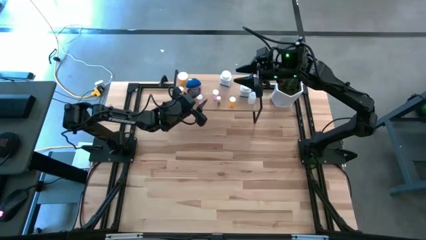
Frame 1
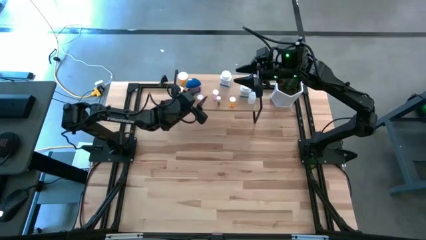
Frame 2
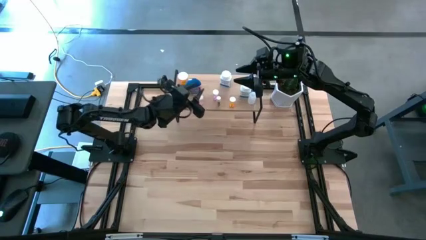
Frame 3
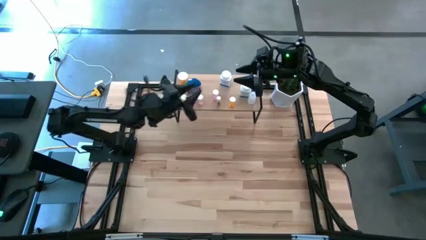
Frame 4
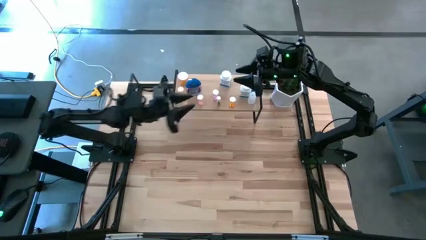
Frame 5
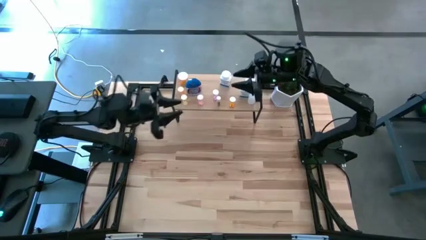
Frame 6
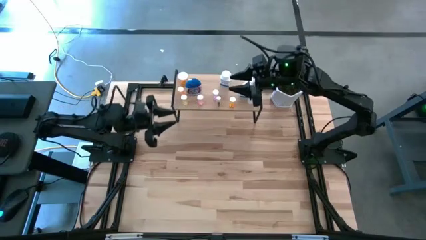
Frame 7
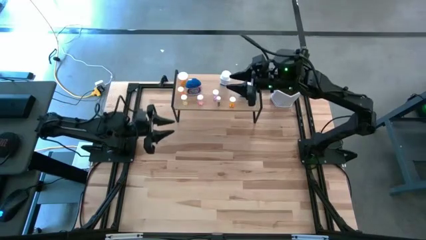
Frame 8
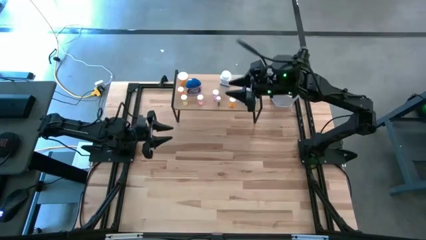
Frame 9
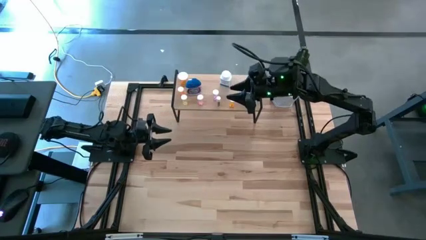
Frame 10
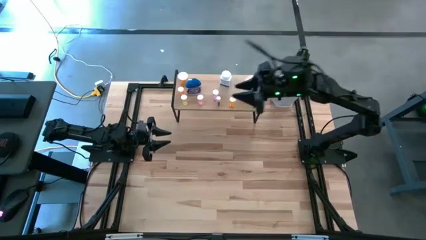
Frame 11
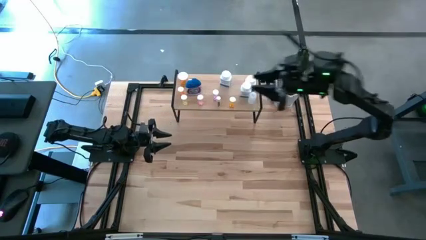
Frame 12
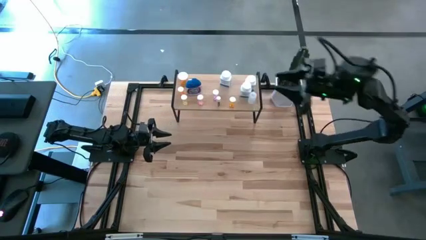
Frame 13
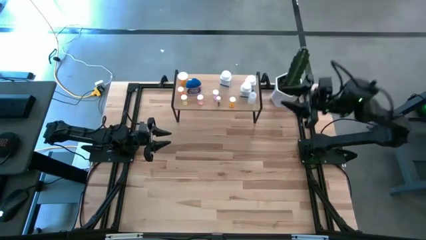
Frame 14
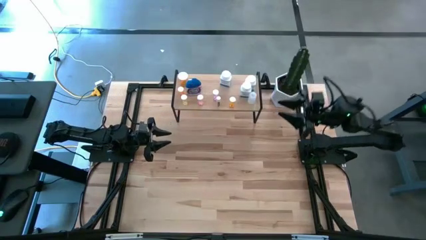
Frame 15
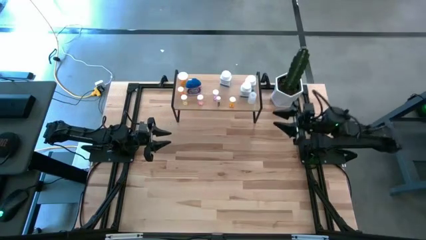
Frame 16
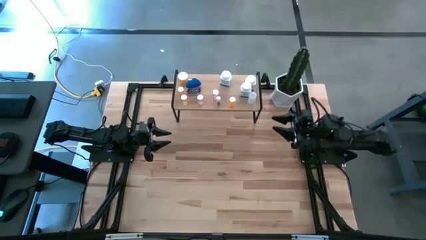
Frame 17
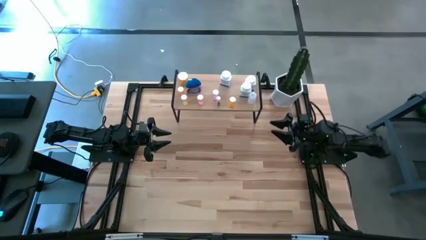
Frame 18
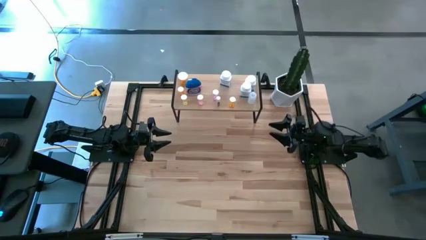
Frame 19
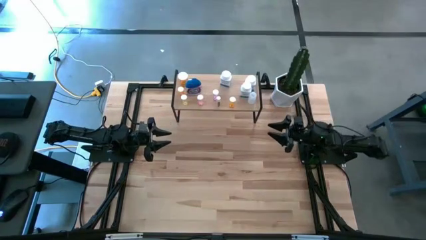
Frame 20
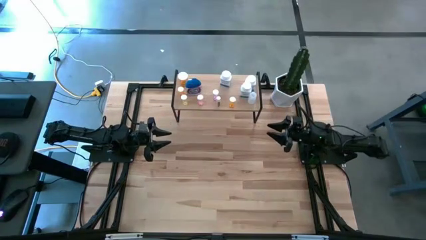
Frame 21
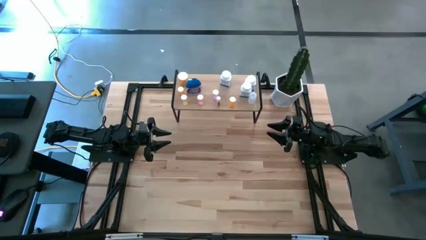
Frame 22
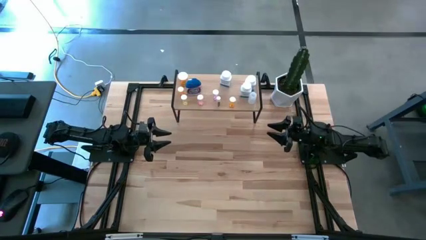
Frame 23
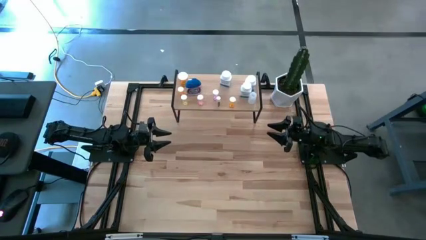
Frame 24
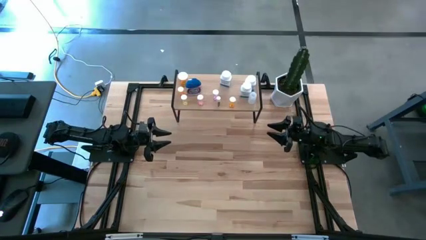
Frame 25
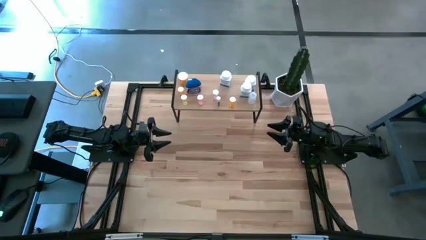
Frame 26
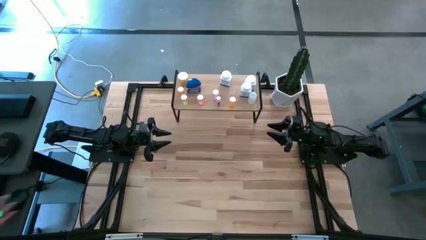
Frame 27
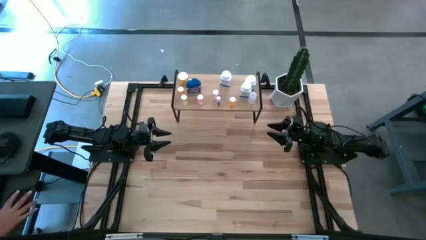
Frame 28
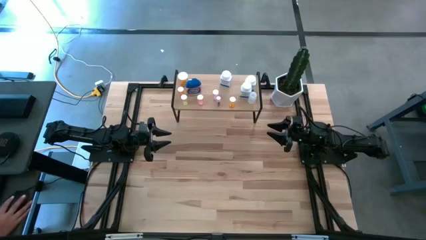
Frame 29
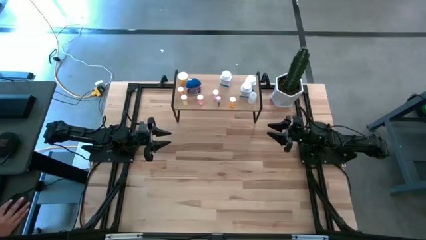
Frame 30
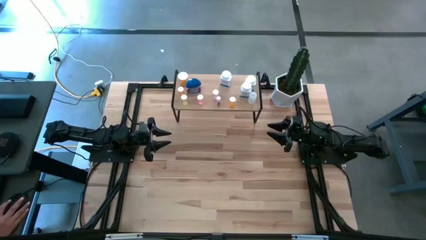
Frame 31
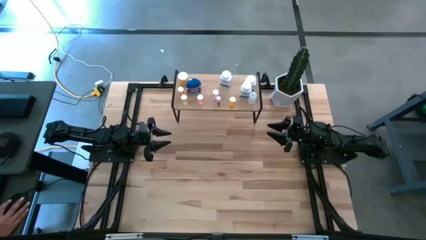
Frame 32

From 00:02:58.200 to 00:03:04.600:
Task: Pick and place medicine bottles onto shelf by color
Return to Home Position

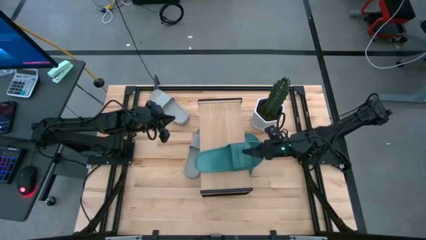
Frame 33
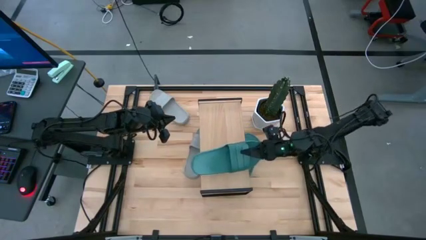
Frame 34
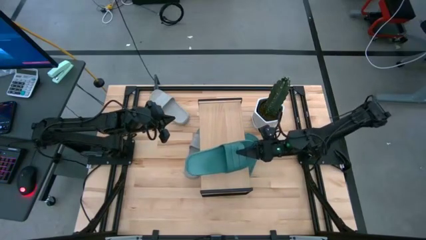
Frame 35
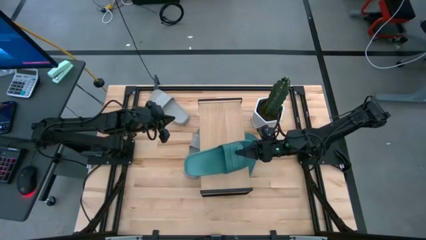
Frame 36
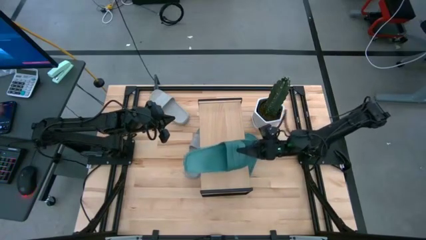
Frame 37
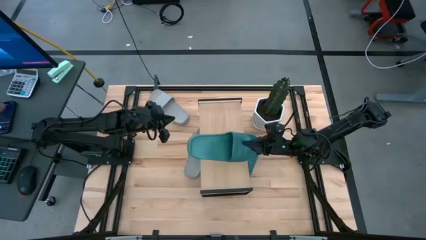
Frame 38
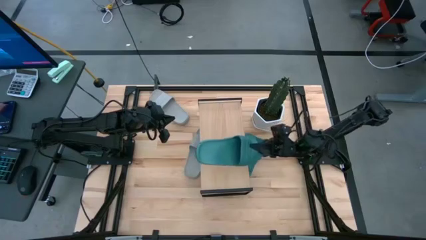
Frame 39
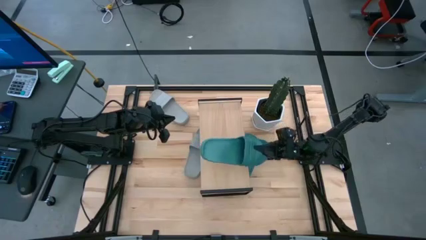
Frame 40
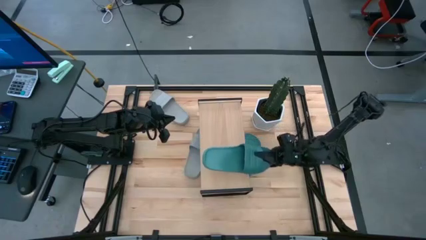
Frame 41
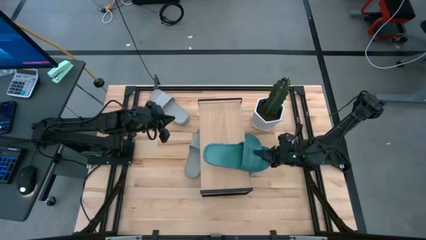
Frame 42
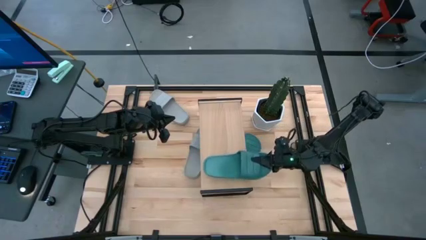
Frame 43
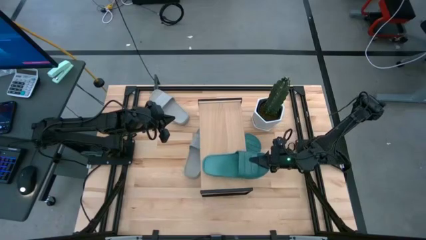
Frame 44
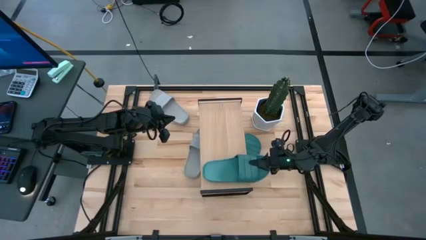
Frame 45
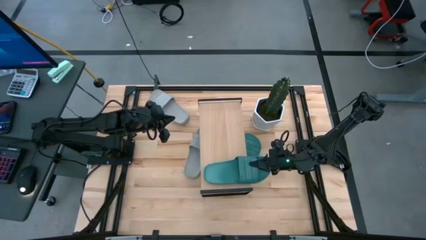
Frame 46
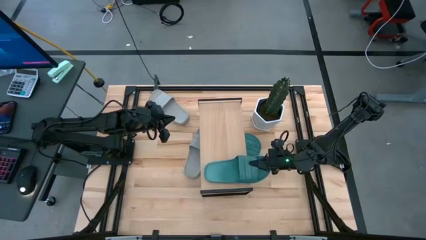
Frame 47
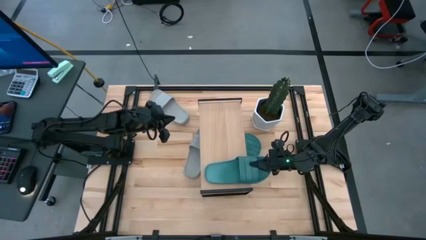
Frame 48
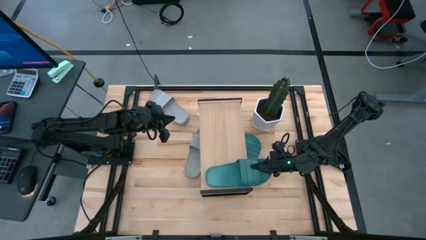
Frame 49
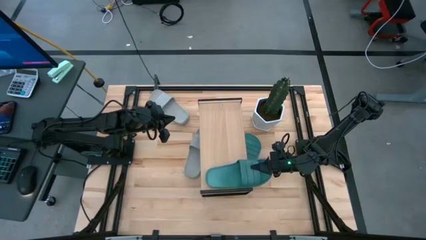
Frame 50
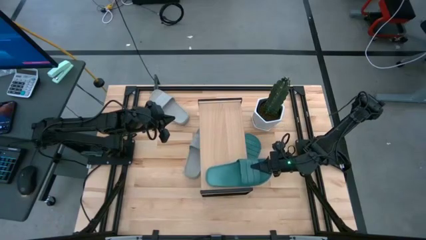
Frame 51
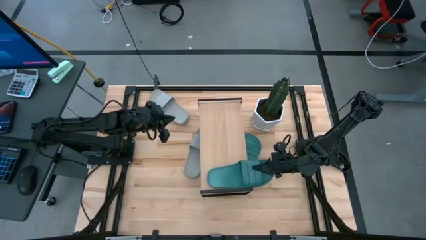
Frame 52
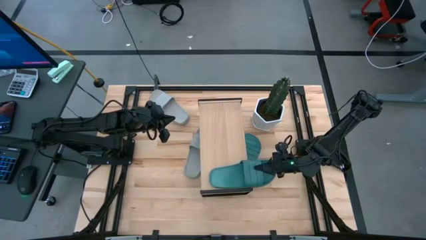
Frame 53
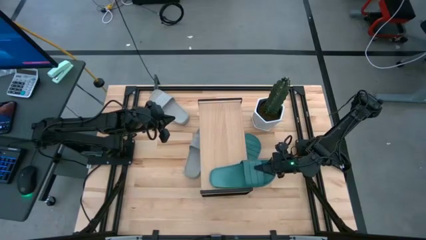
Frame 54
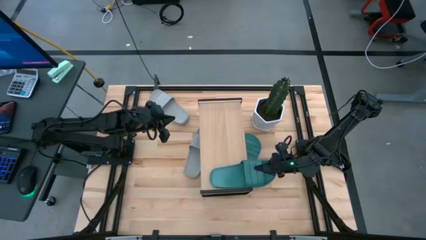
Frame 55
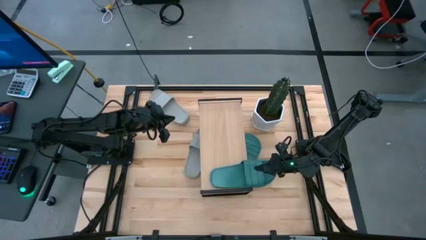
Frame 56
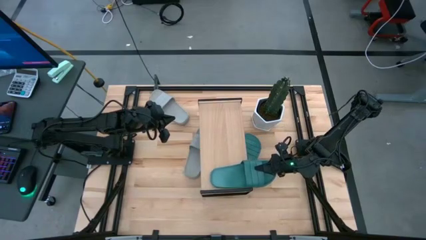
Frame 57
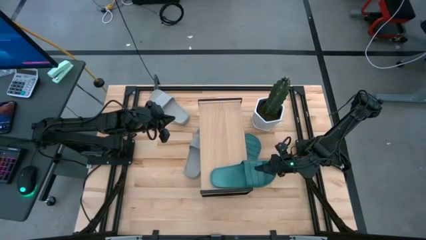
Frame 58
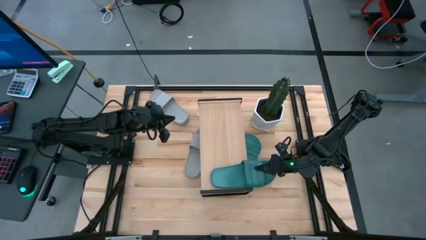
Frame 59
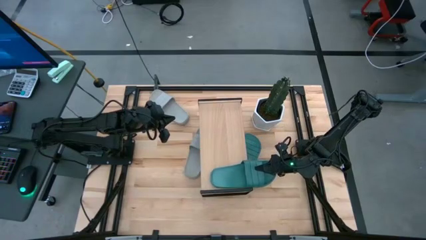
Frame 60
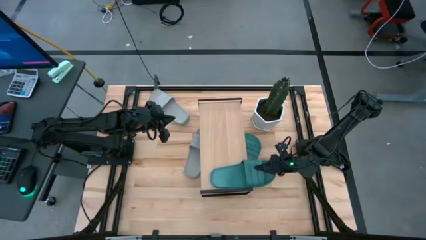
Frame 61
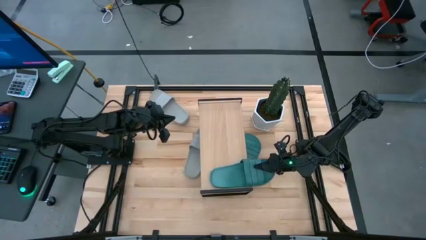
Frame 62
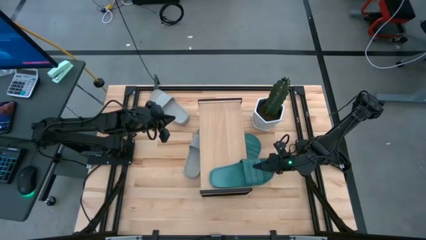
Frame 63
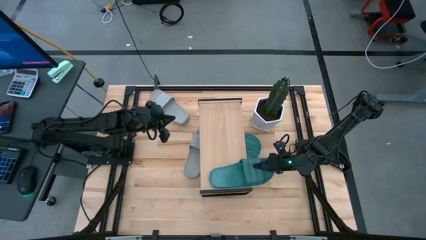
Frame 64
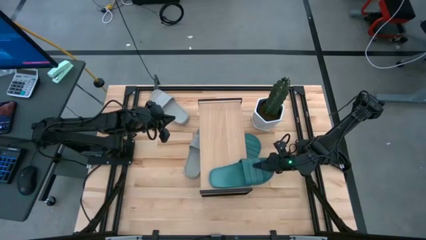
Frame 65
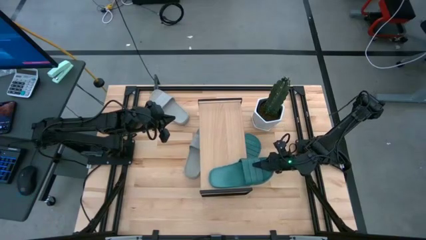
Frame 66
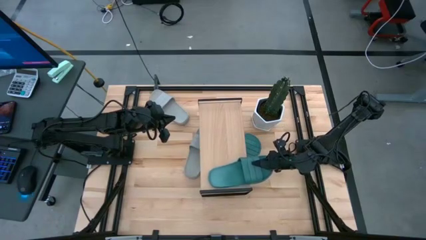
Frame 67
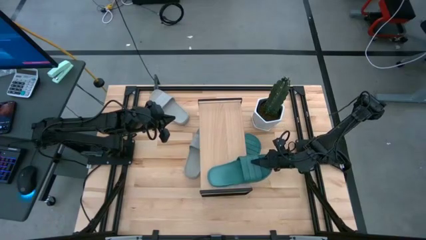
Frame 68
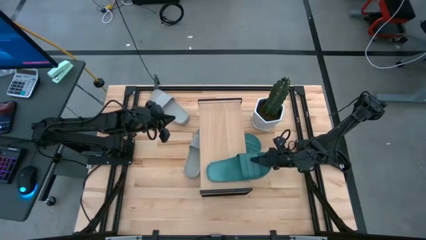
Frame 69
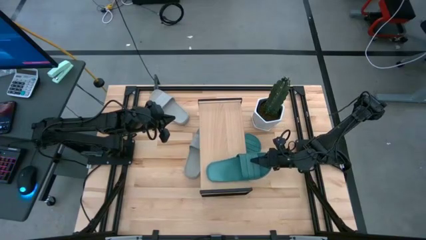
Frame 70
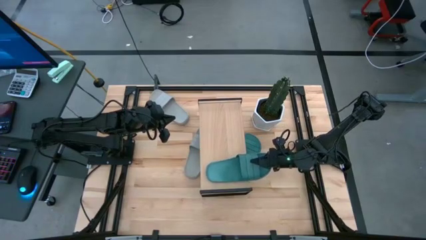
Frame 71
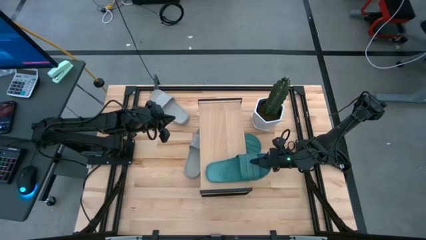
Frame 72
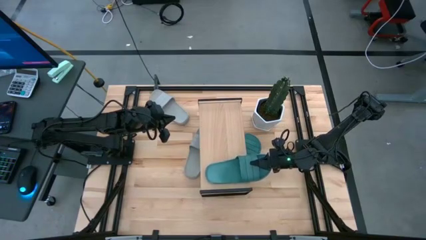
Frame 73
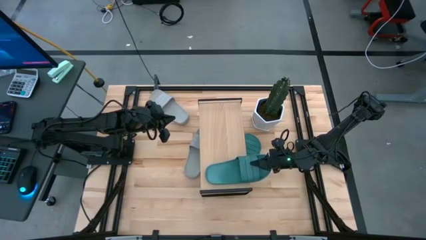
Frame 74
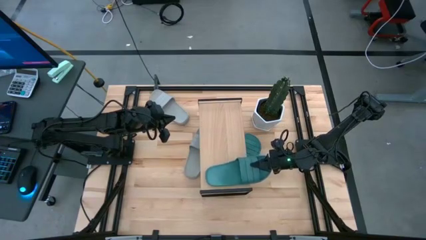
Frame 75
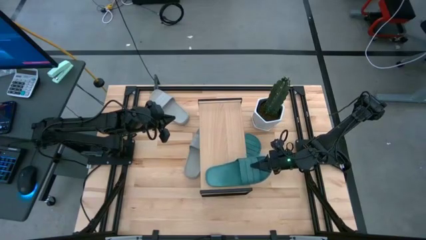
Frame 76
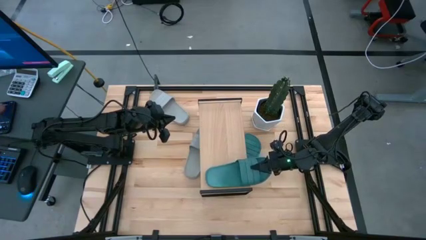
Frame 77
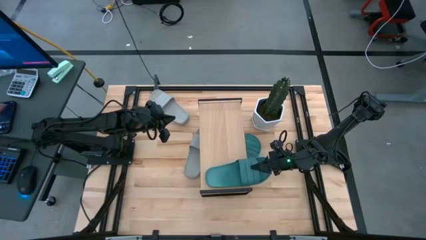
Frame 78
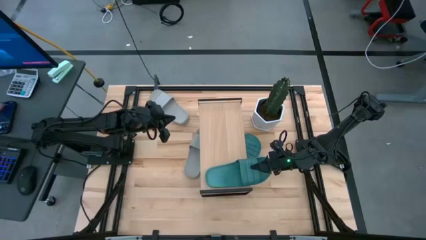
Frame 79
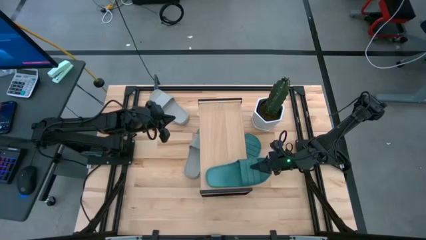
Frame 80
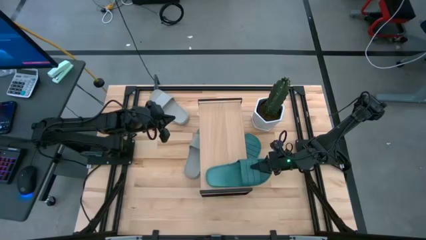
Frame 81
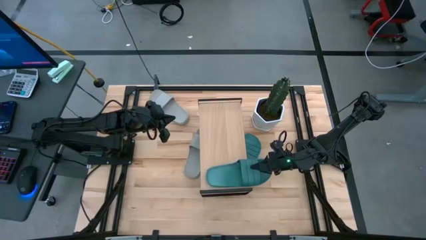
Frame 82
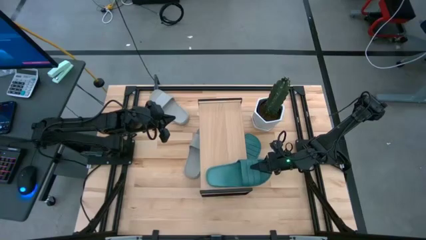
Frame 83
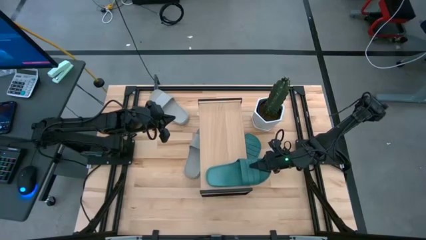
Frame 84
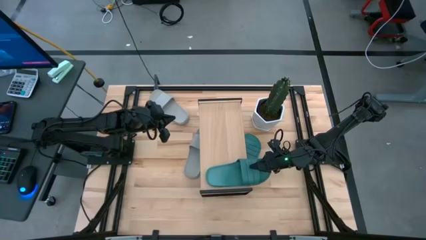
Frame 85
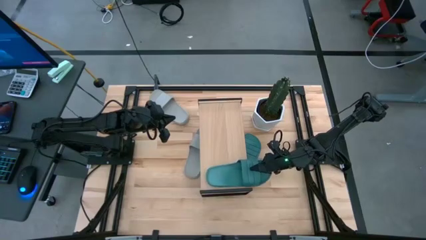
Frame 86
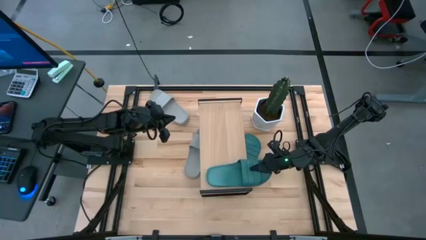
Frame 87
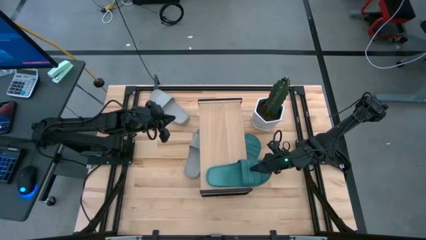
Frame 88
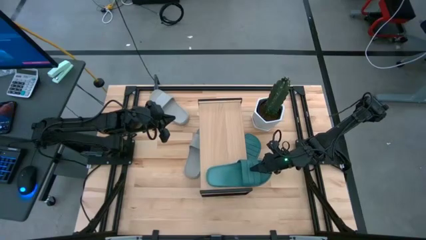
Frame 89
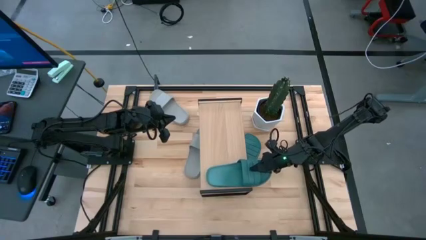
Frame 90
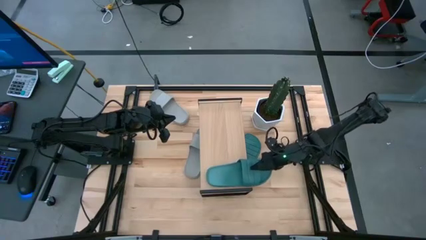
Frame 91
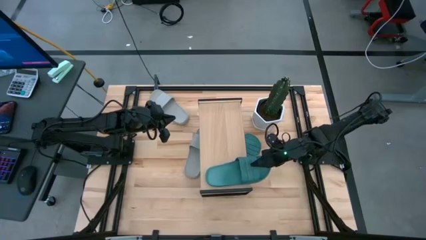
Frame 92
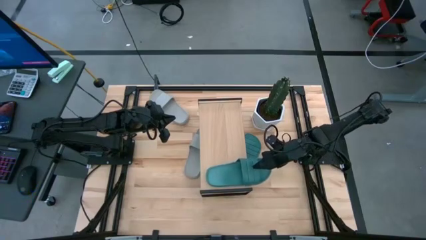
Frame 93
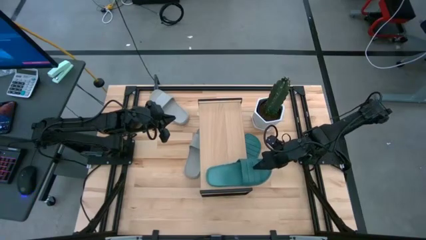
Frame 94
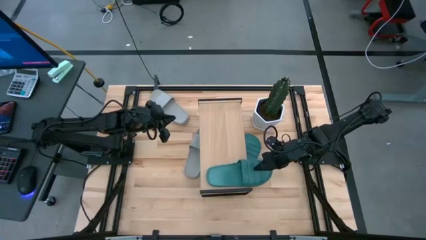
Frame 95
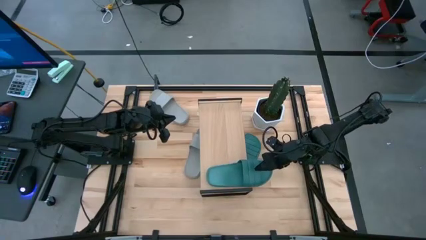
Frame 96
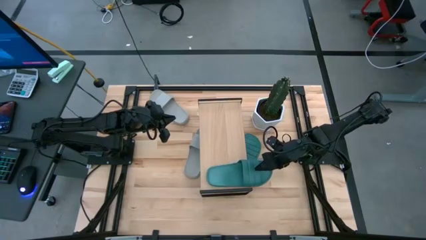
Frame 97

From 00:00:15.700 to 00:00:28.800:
Task: Pick and place slides into the shelf
Put the right green slide on the shelf
